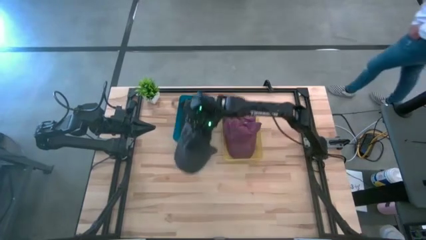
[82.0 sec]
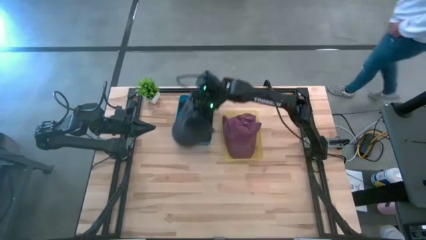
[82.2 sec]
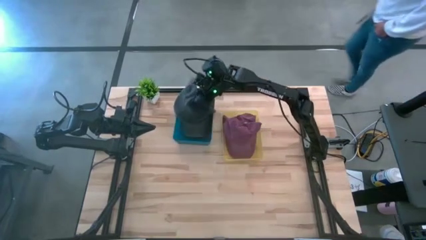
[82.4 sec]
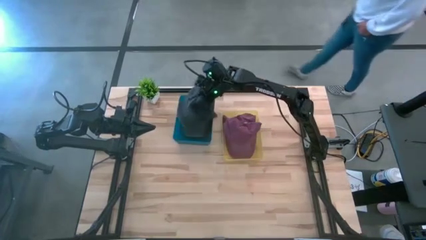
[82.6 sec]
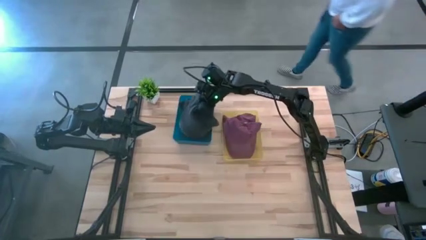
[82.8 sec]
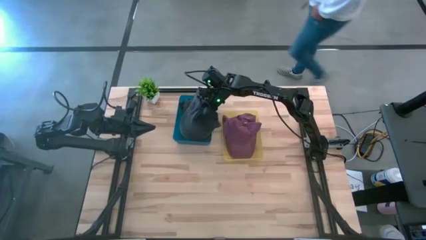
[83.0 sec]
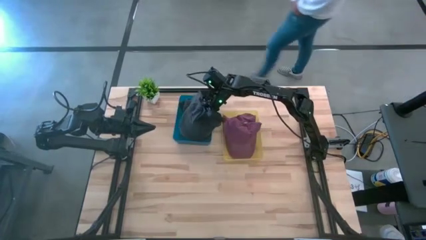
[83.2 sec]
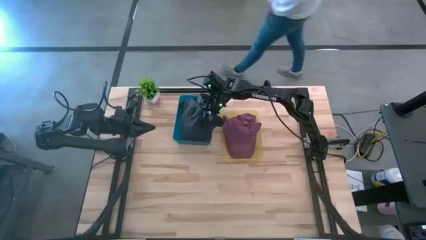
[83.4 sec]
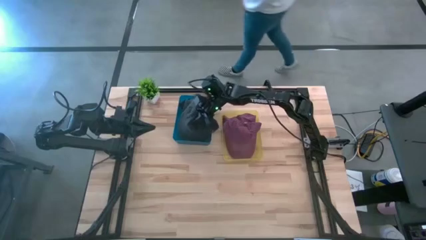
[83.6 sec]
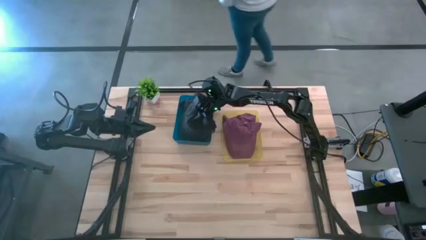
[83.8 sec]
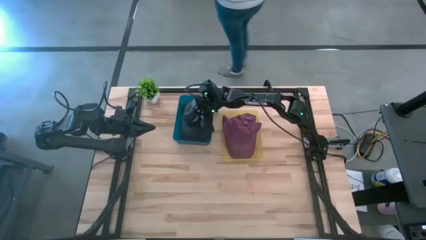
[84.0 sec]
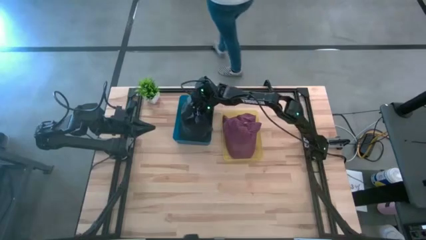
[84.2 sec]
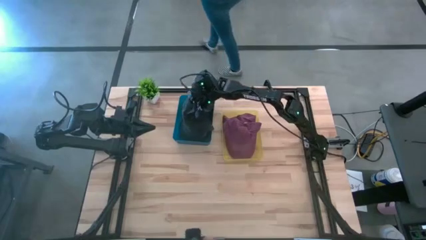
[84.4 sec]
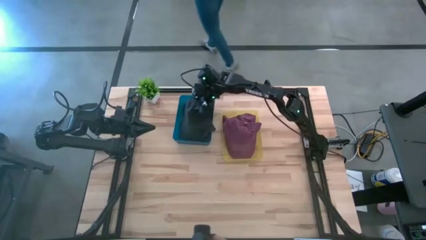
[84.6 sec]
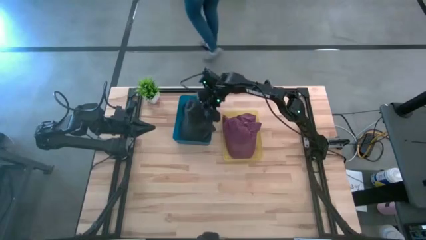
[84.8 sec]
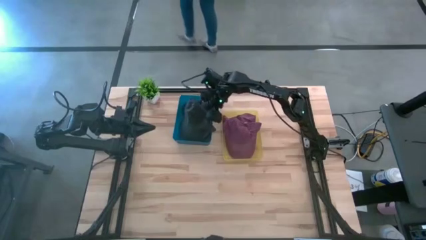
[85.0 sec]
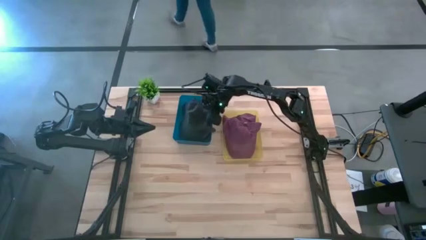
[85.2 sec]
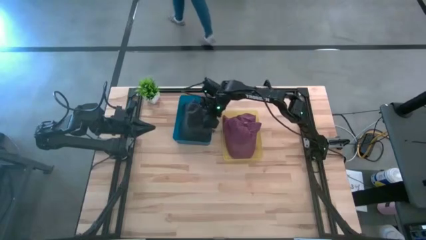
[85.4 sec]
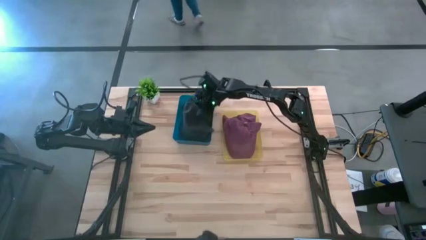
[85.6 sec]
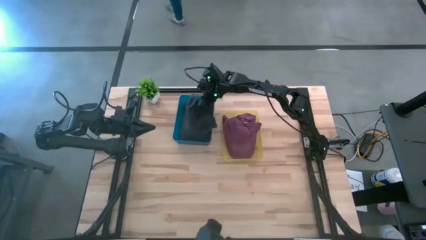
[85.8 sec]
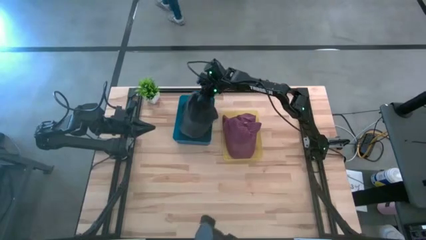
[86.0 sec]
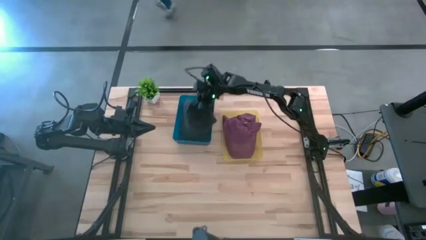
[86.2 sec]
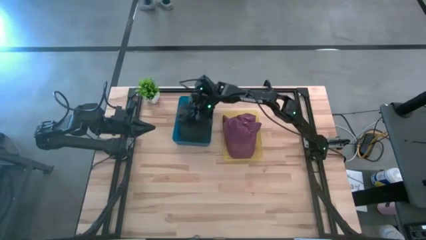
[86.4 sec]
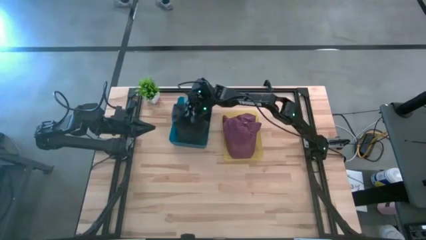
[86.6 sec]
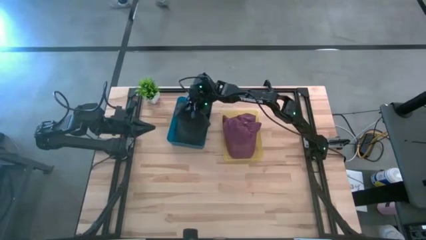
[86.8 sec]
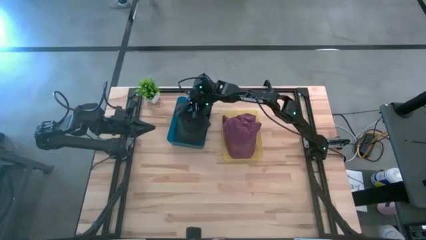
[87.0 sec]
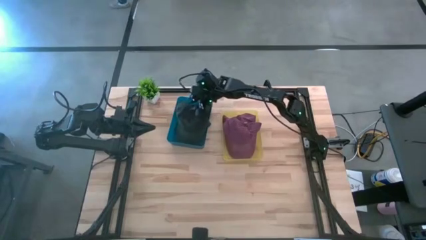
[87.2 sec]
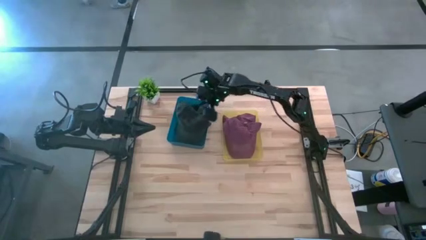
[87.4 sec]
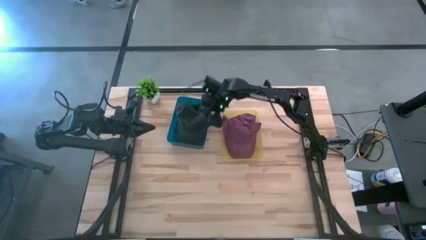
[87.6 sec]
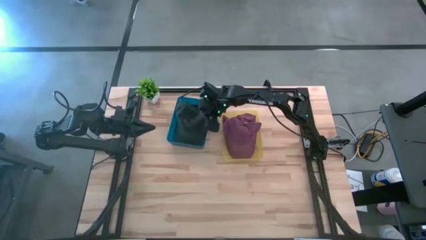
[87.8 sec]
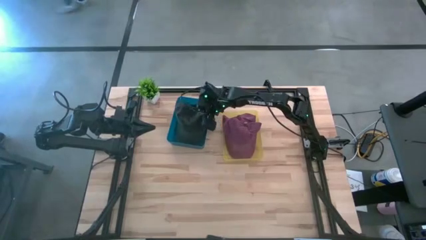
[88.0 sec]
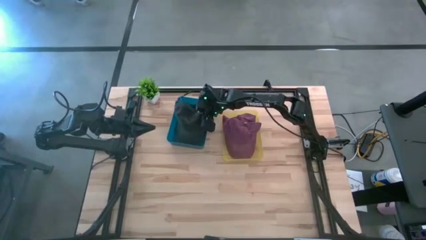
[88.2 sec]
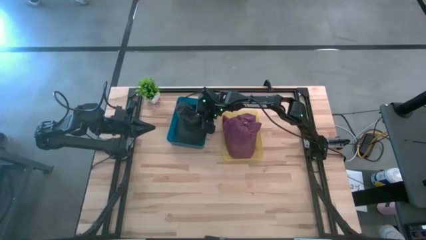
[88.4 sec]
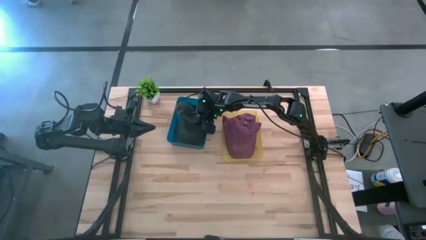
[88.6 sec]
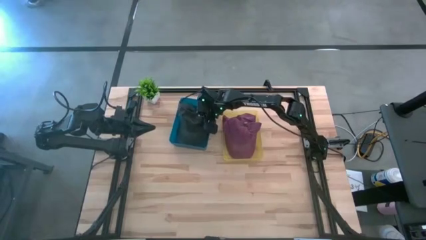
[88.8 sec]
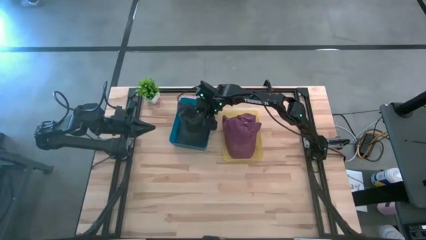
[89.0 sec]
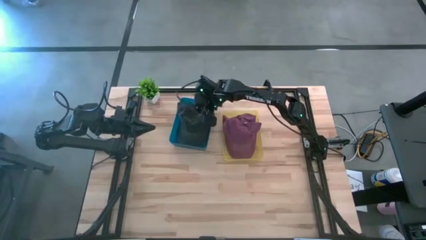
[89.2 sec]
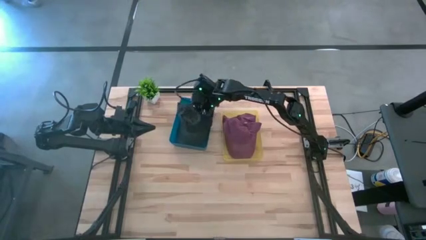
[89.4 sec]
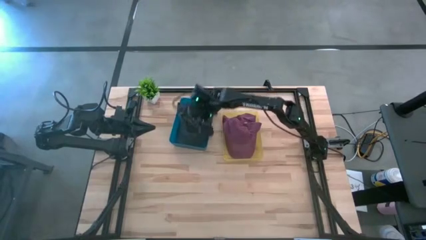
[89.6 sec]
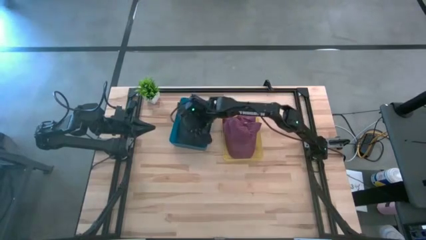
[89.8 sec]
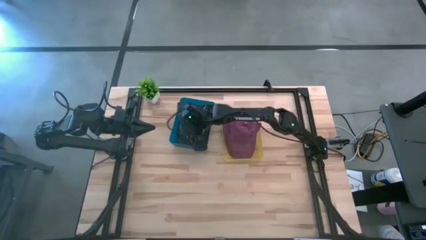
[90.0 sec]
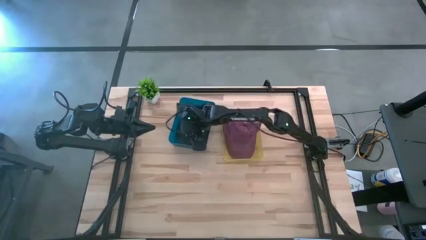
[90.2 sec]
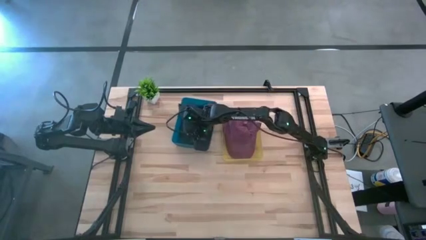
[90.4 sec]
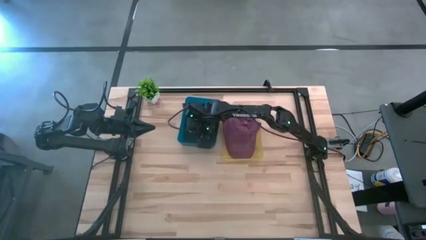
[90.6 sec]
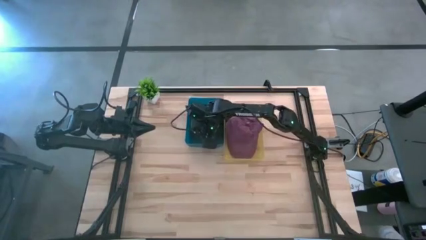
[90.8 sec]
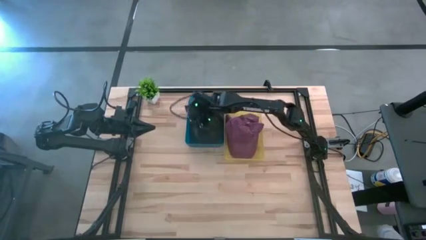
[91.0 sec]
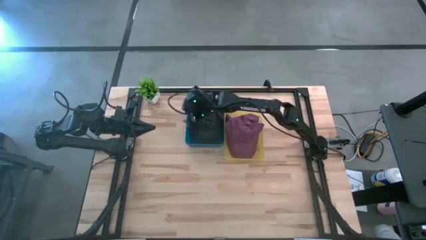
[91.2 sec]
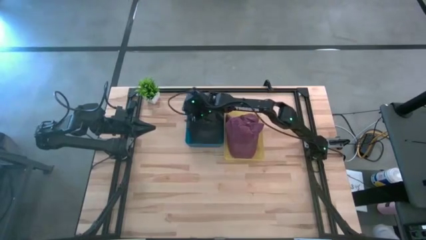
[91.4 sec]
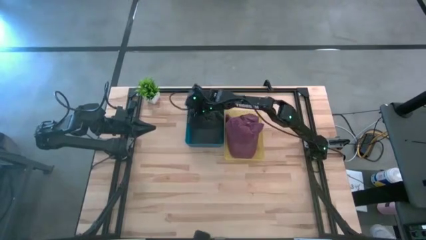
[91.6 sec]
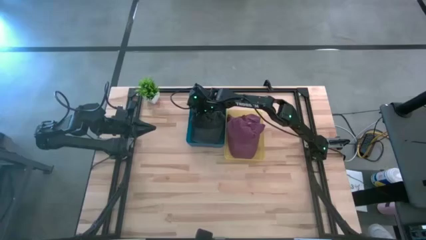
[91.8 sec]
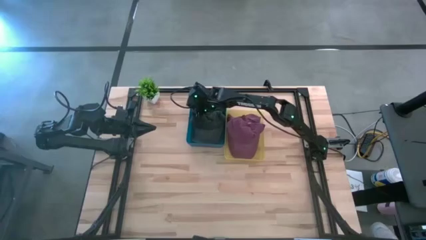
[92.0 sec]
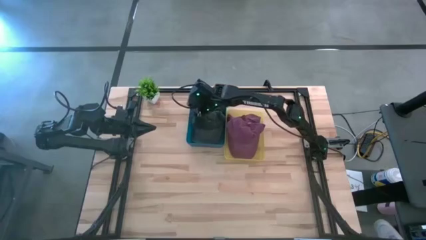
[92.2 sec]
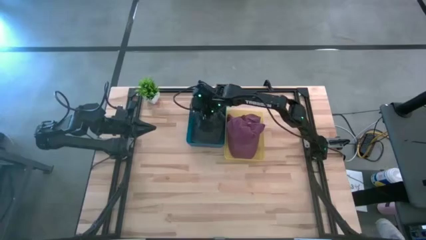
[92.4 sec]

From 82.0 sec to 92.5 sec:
Task: Pick & Place hat
Put the black cap into the blue bin

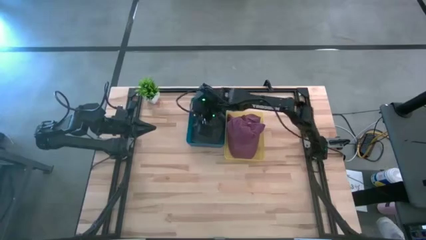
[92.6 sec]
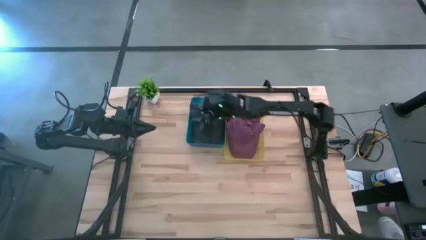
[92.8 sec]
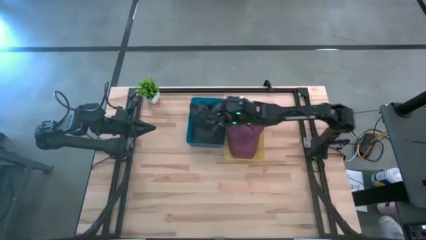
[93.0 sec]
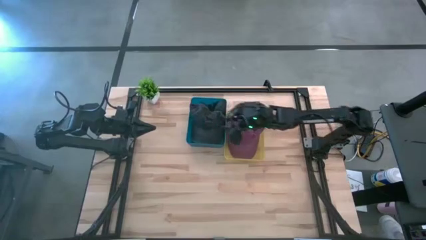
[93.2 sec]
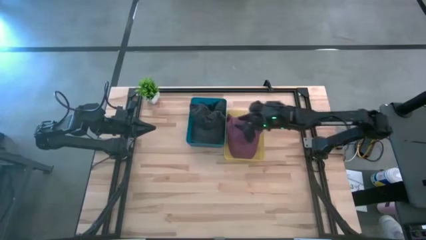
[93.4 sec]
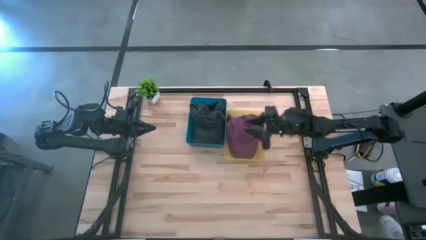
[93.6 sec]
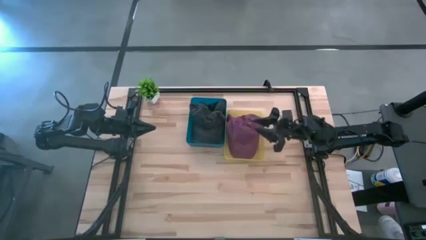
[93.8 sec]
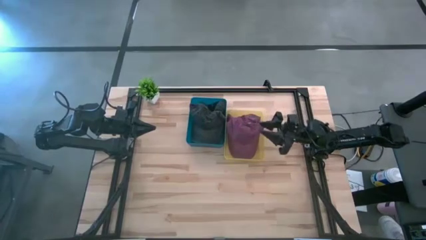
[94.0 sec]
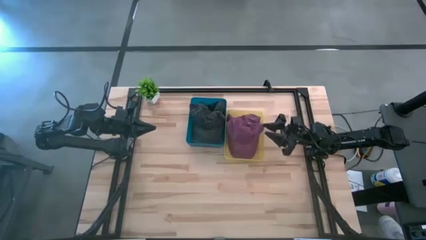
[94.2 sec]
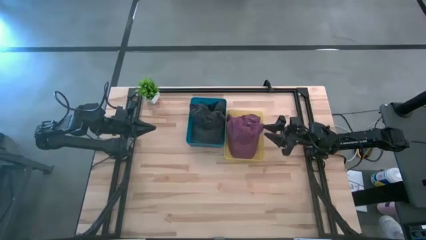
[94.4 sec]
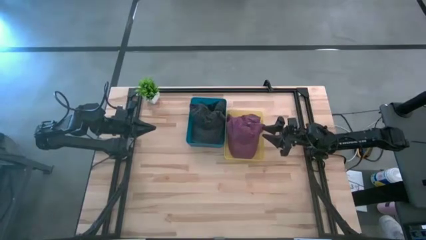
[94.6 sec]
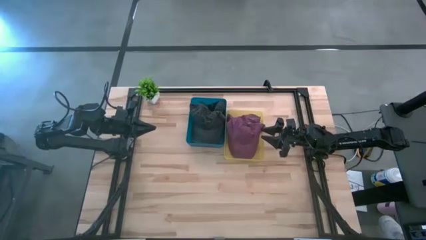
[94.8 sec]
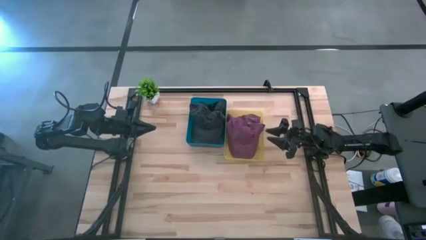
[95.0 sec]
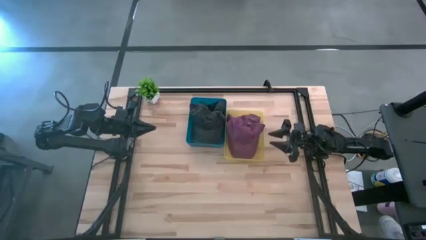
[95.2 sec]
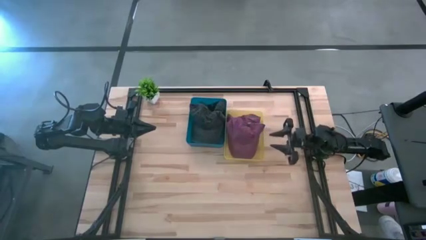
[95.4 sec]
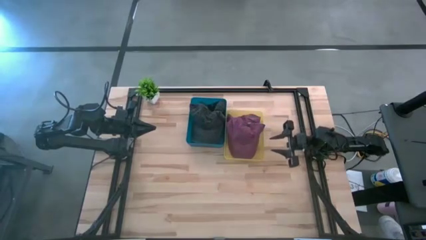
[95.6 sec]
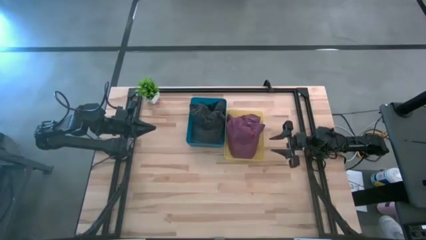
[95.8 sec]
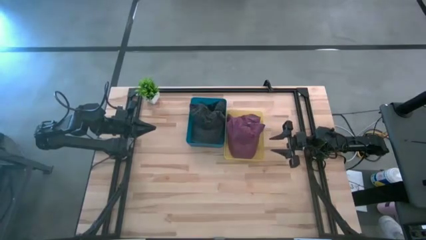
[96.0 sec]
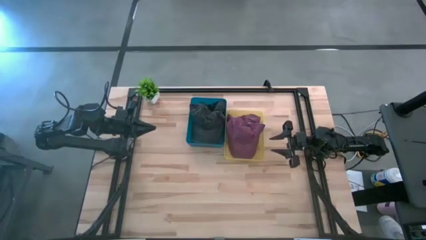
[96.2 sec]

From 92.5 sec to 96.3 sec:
Return to Home Position

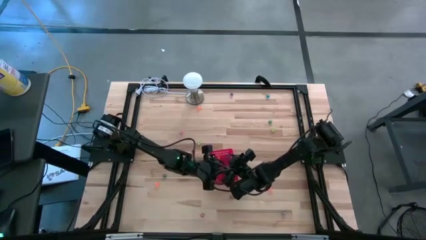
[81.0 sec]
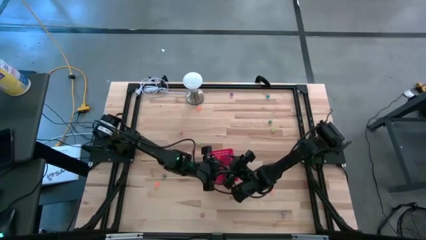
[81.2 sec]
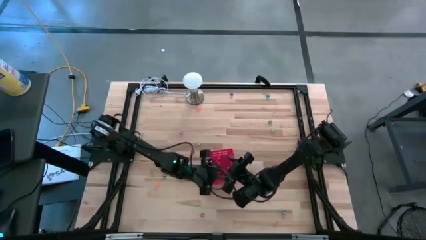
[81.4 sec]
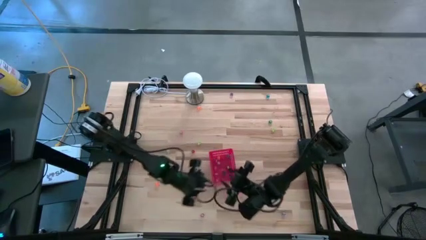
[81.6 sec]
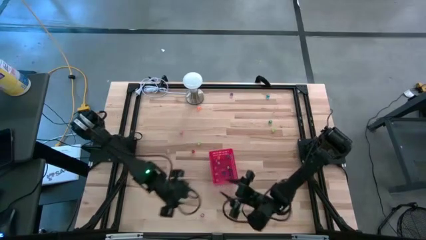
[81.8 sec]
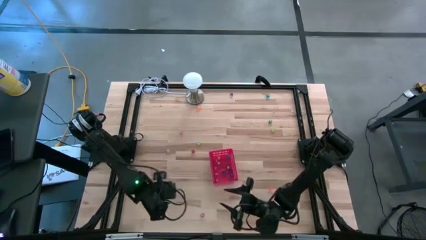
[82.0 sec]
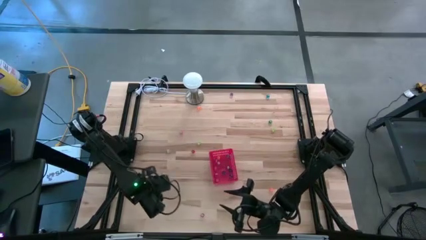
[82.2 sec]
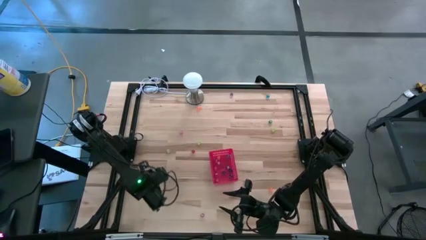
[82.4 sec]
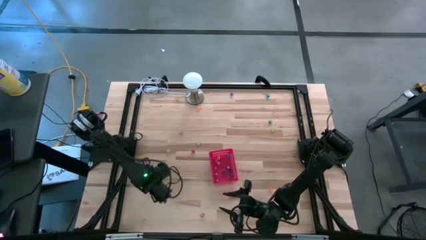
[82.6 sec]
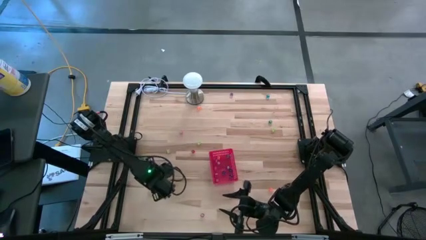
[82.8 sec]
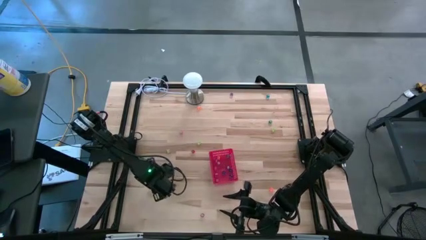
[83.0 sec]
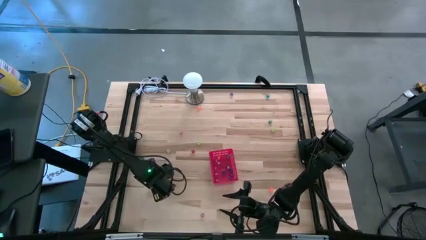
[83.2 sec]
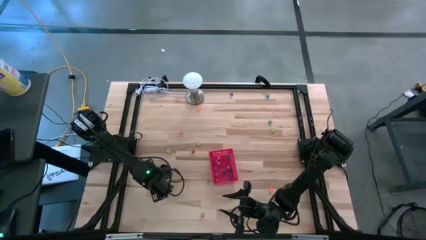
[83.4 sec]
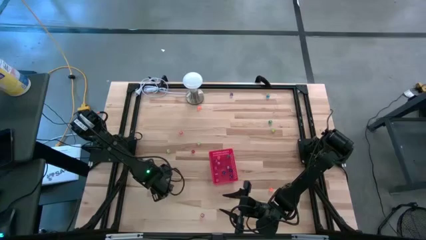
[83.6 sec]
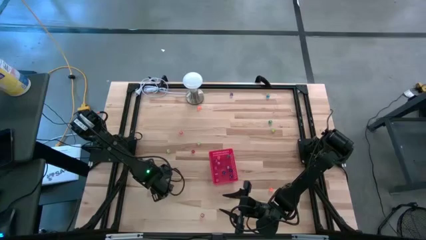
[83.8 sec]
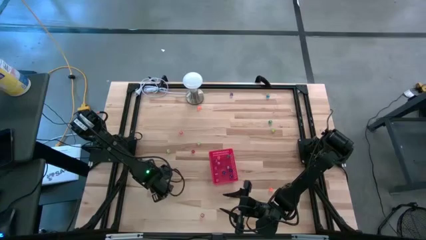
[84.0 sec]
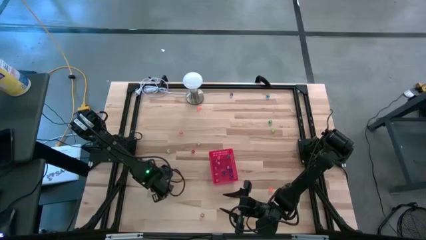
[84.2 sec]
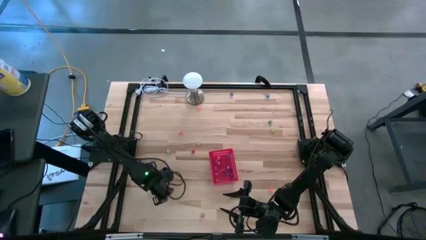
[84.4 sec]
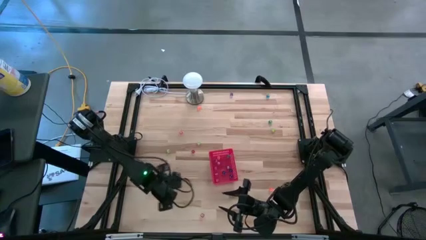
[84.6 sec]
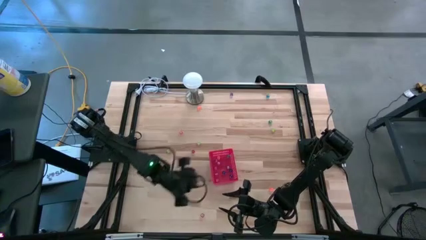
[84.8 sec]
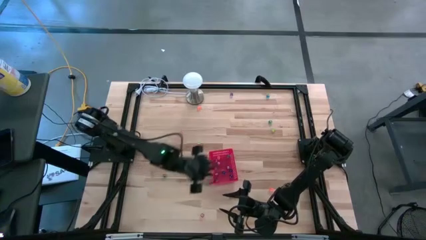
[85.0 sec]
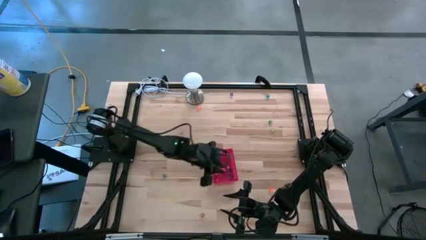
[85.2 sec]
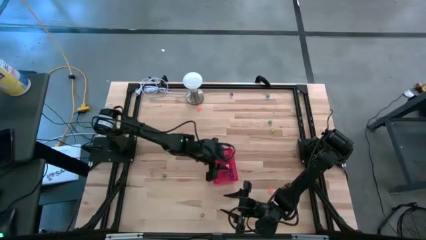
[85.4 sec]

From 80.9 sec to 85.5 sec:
Task: Pick & Place Dice
Put the orange die into the red basket
